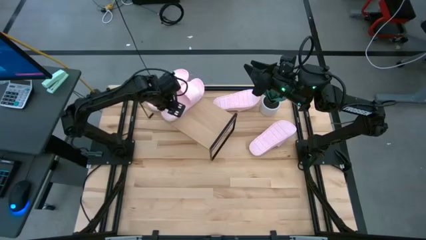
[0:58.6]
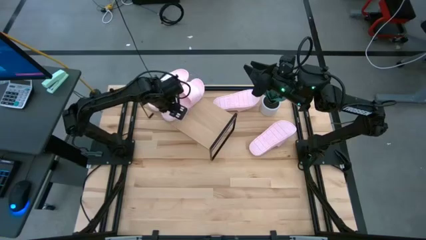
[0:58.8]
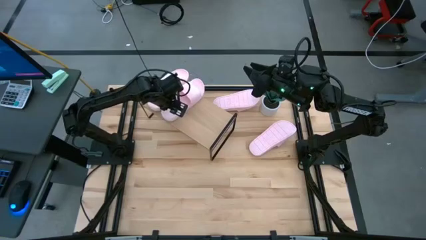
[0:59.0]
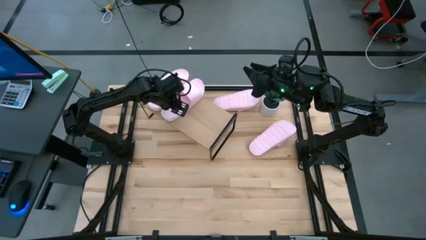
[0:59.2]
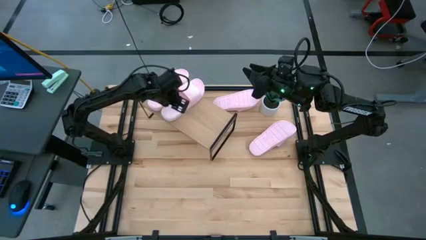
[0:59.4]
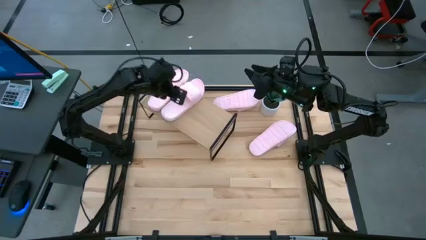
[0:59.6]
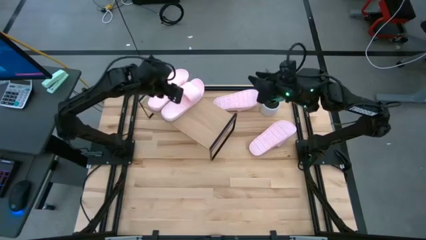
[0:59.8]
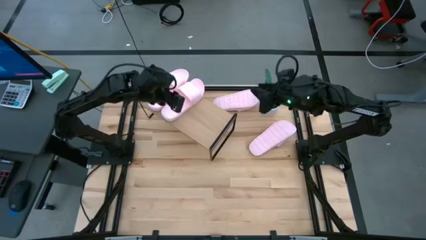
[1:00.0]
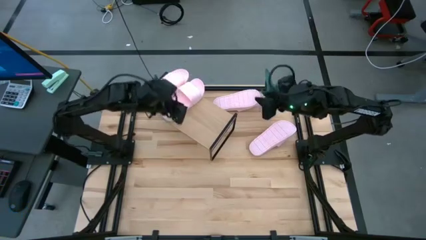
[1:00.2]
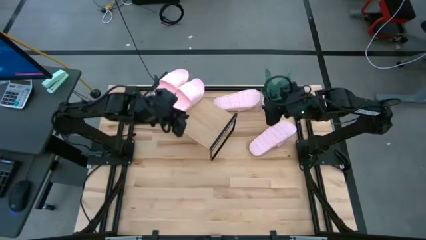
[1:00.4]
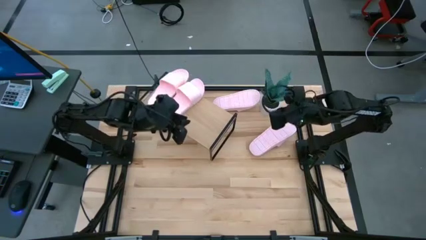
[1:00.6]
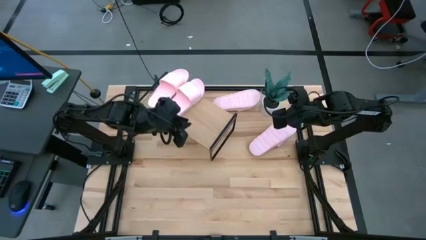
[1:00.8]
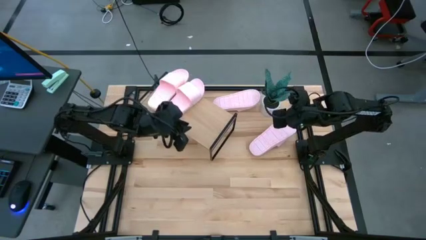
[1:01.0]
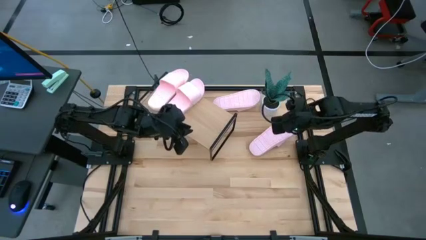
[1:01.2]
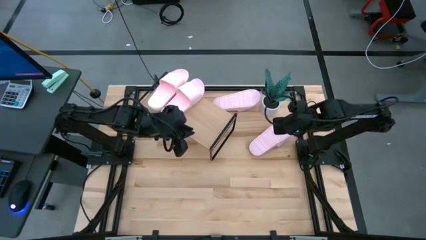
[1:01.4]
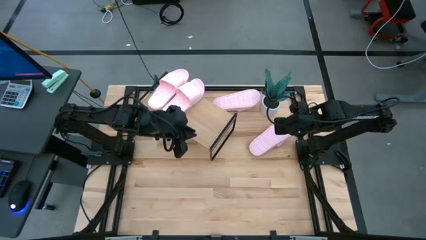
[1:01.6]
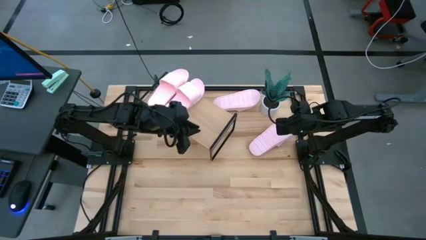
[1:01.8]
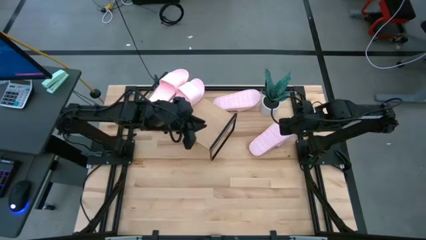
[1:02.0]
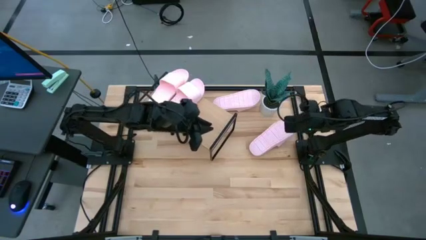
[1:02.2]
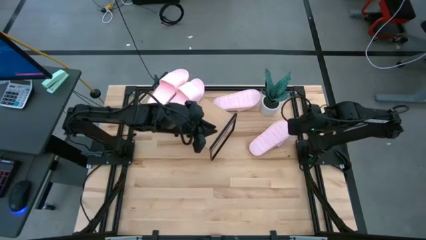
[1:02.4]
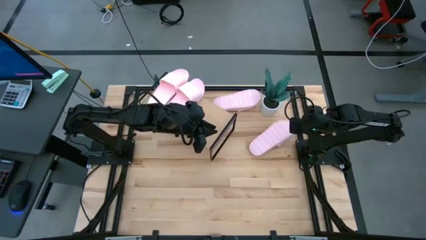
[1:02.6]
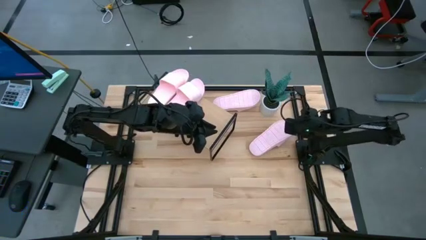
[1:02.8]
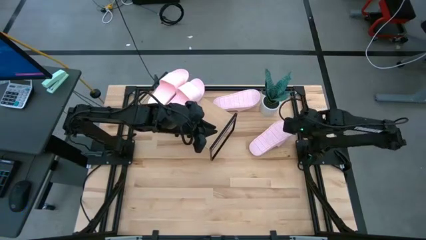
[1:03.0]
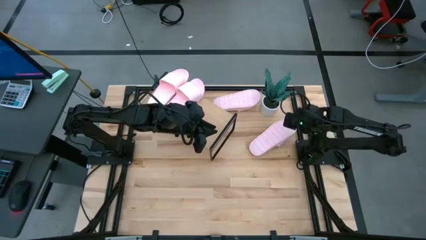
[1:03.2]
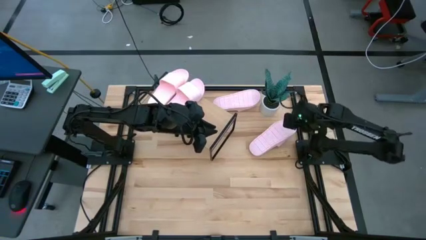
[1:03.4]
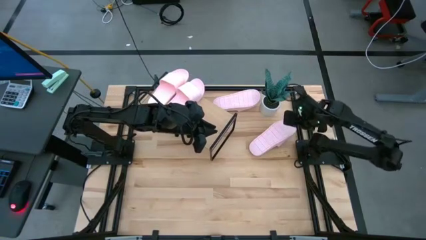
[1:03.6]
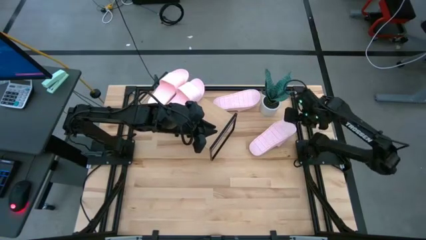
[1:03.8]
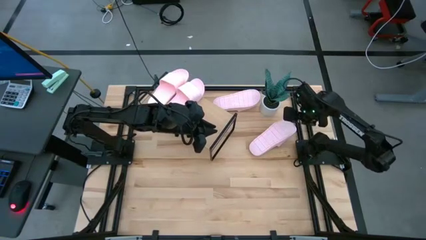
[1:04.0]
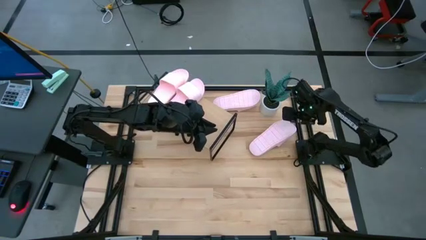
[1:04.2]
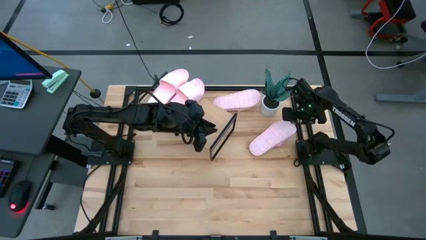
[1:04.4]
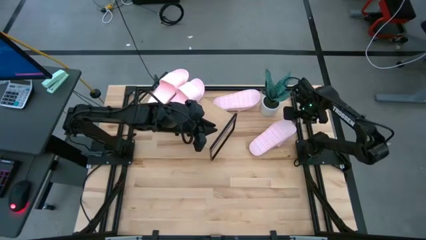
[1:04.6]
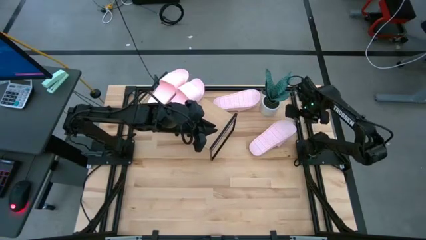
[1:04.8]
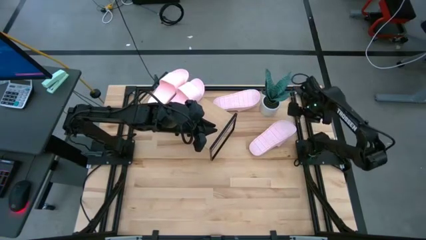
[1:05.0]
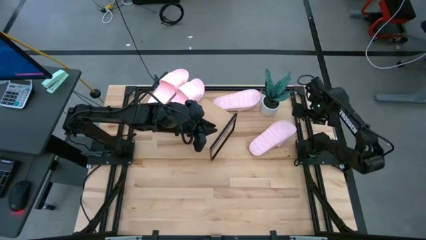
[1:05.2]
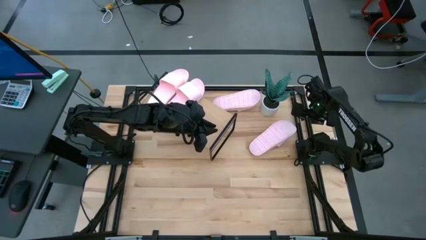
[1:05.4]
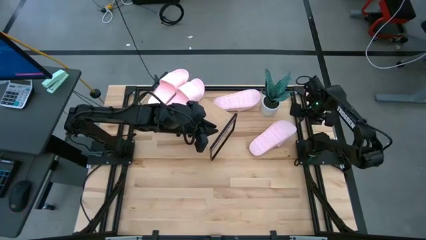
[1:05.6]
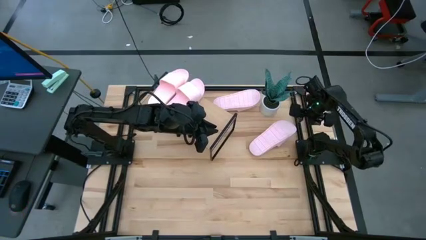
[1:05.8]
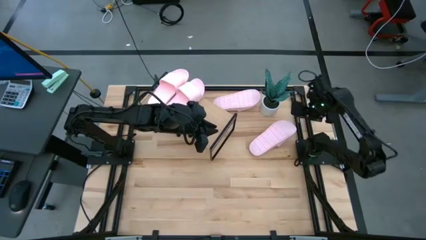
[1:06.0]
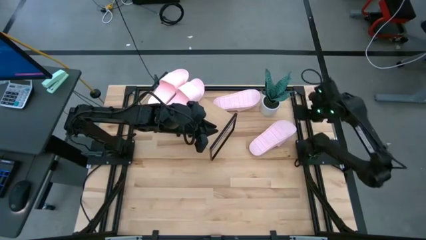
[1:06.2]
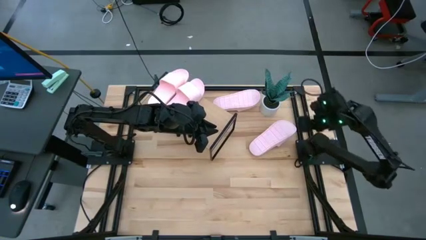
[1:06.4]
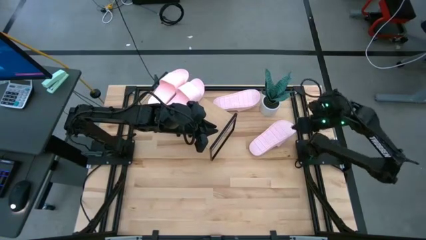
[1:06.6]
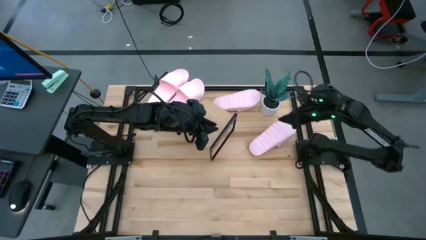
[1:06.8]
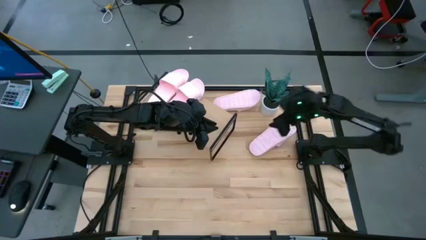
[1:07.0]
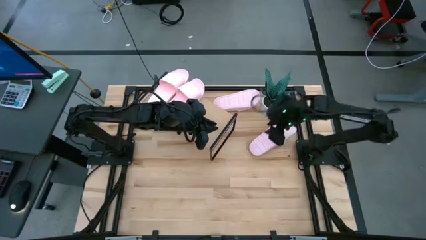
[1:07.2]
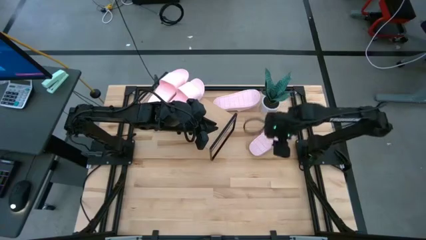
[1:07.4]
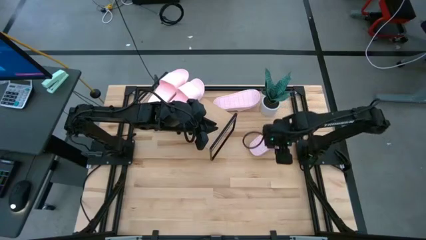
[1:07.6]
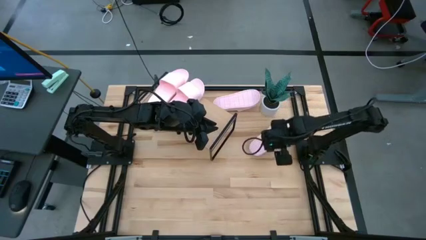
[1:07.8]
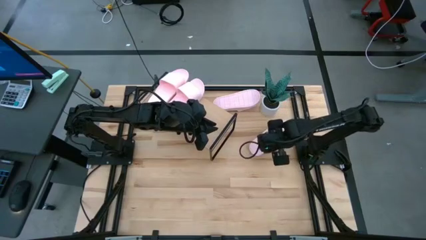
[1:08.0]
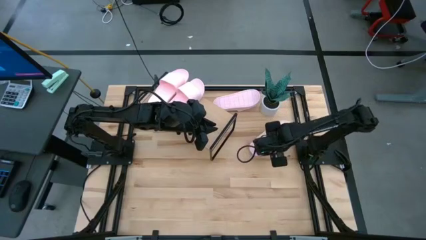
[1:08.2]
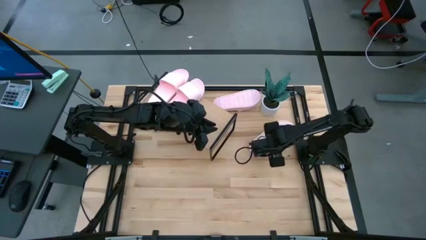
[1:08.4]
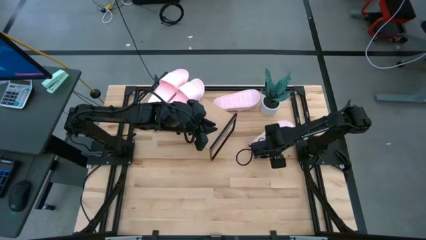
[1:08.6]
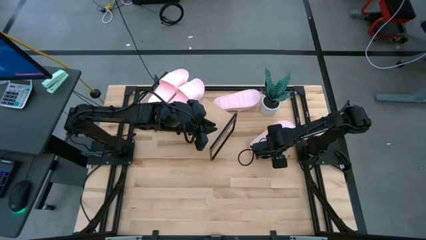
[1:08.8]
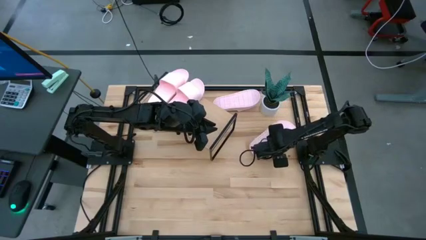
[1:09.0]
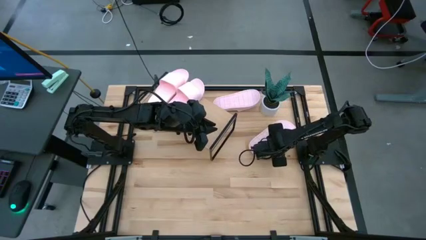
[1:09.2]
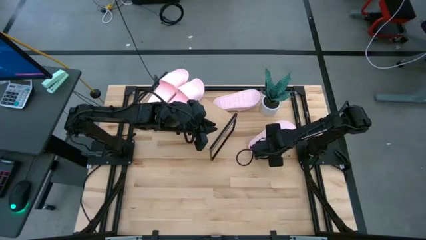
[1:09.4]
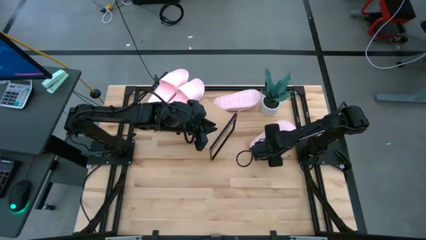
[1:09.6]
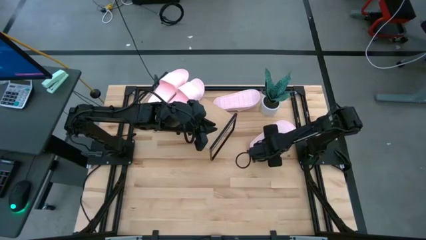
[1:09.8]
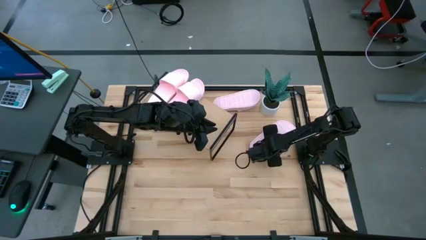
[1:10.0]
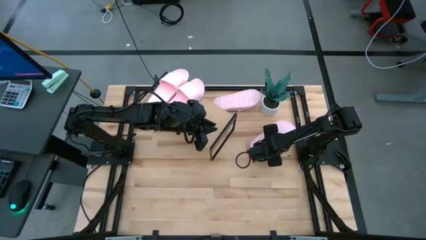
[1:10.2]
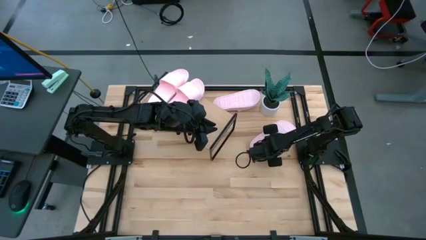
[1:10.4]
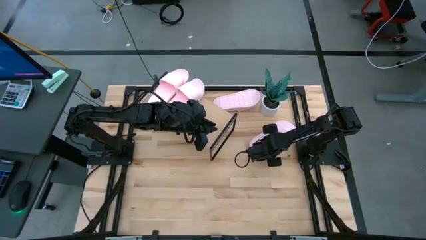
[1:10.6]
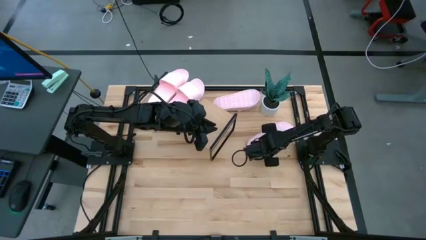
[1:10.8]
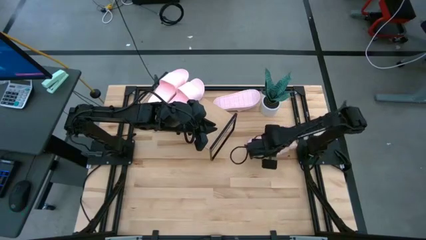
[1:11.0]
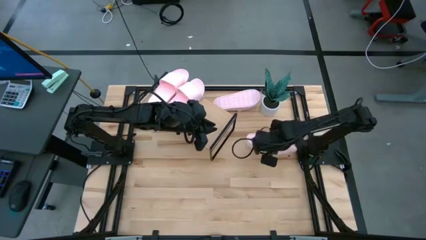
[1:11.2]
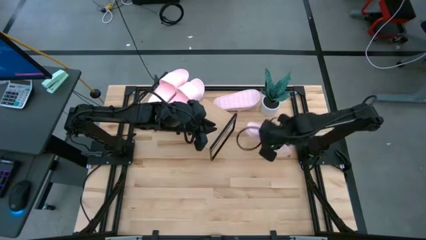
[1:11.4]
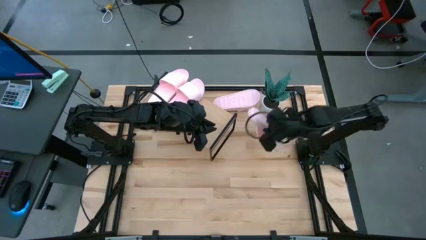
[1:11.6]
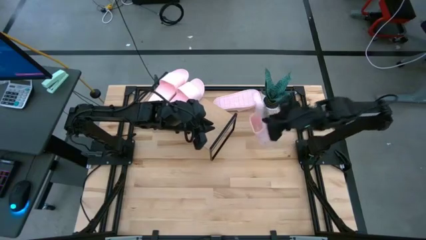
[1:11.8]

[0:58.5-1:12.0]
Task: Pick and place slides into the shelf
Put the pink slipper on the shelf
